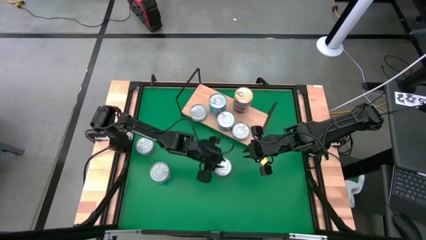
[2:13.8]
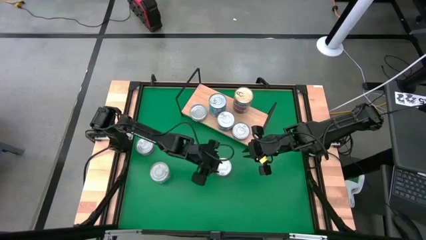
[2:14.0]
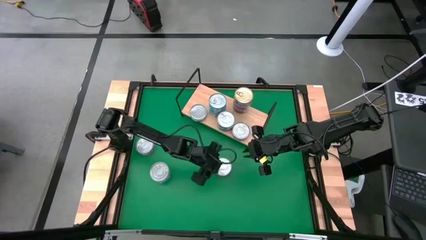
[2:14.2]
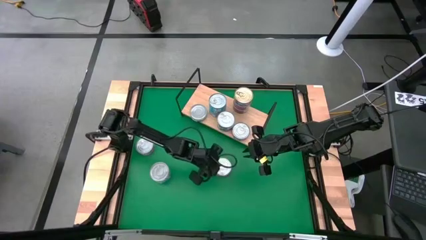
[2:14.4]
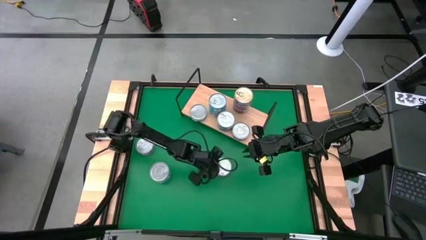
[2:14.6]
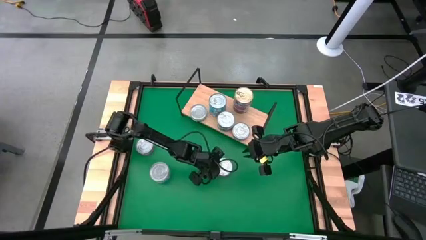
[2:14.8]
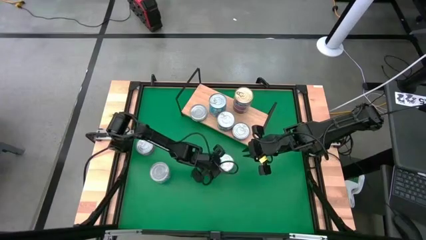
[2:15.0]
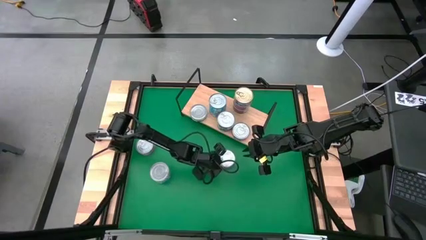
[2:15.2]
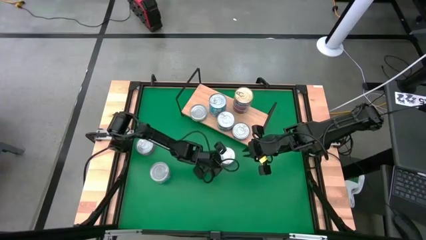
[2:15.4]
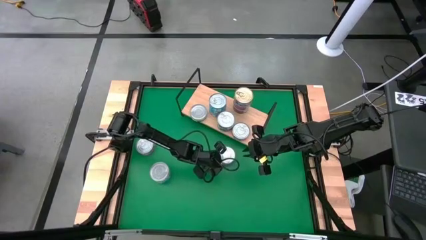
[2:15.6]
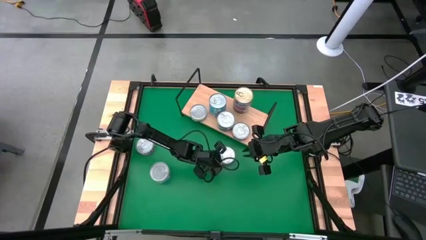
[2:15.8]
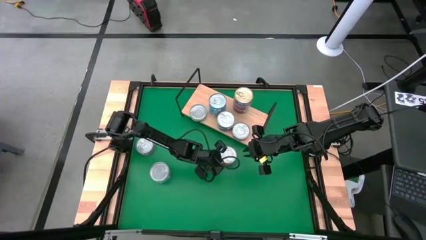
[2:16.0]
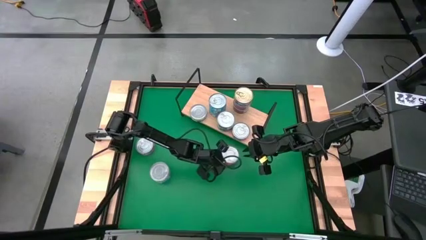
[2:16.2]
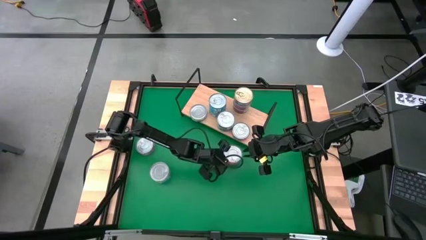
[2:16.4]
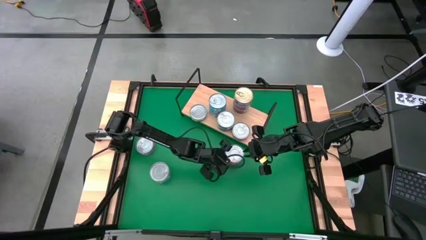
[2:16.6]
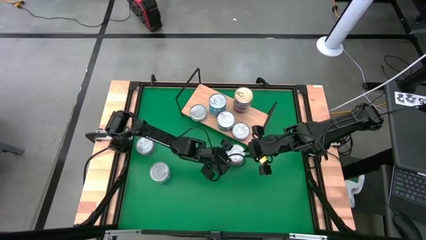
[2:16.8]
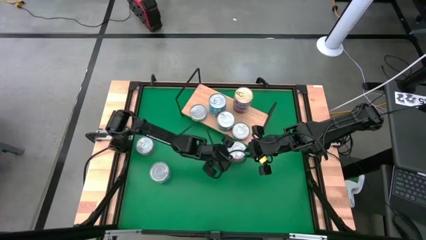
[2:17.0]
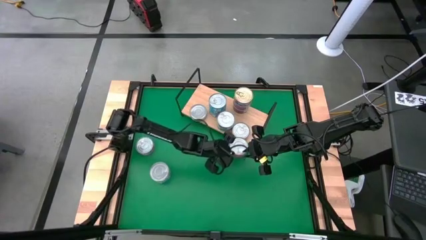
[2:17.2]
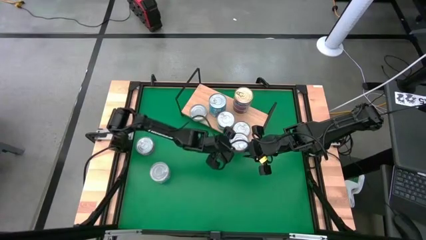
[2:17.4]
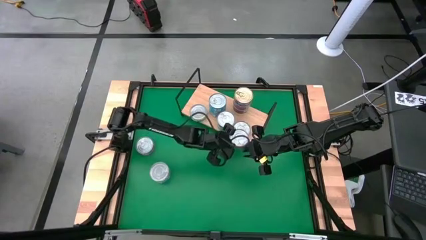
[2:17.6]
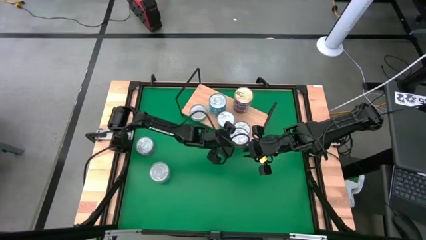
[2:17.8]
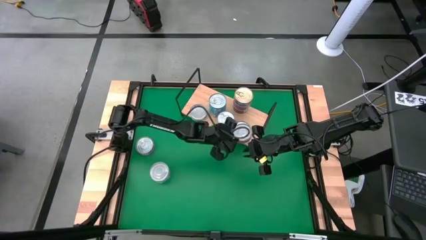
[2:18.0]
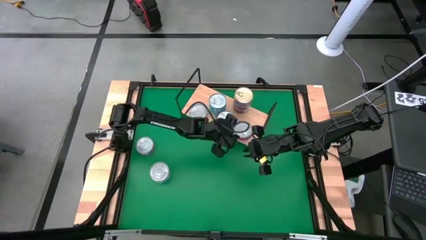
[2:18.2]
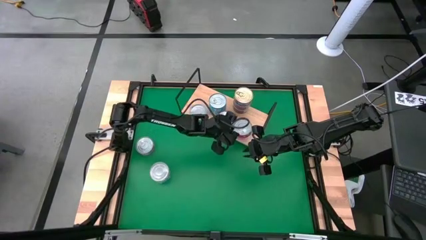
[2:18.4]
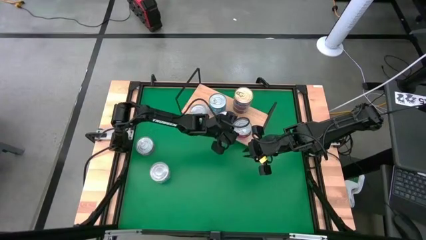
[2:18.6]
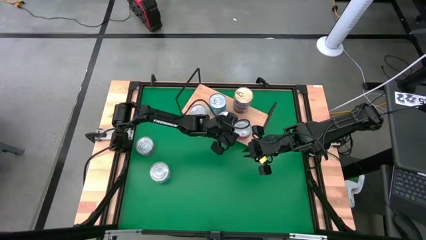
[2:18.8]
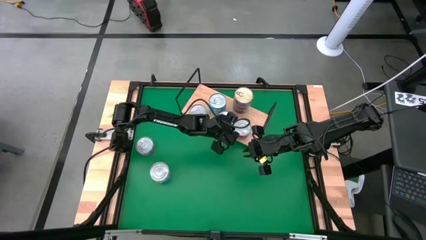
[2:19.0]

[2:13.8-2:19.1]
Task: Stack canned seafood by type on shelf
Stack the red tuna can on top of the red tuna can on the shelf

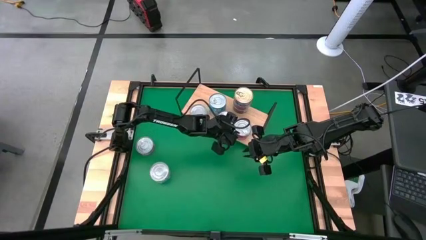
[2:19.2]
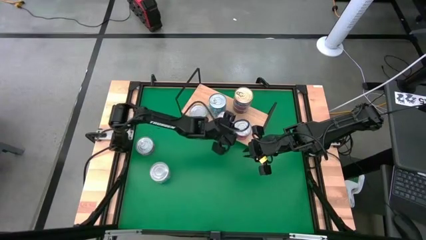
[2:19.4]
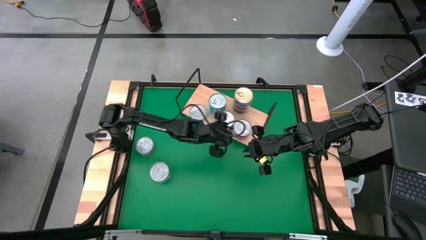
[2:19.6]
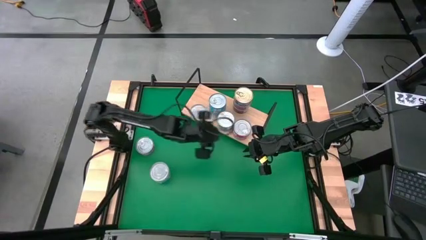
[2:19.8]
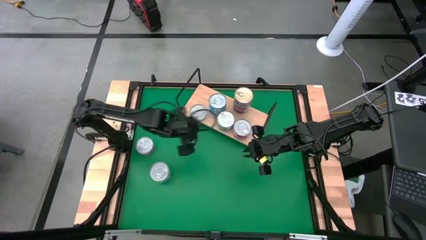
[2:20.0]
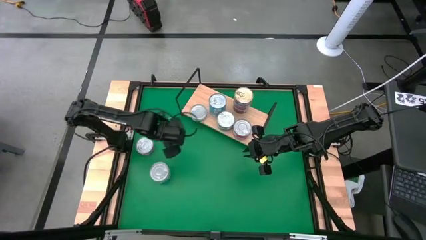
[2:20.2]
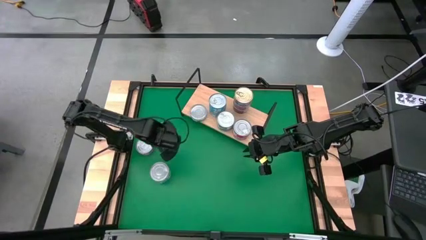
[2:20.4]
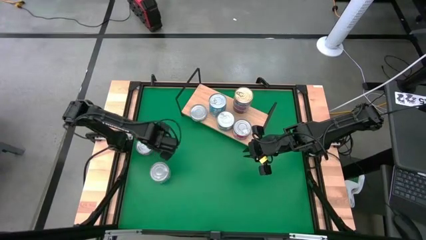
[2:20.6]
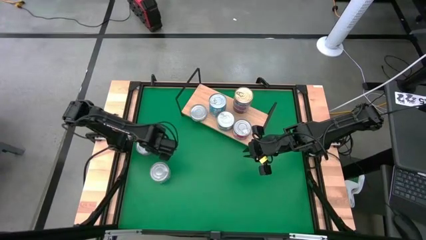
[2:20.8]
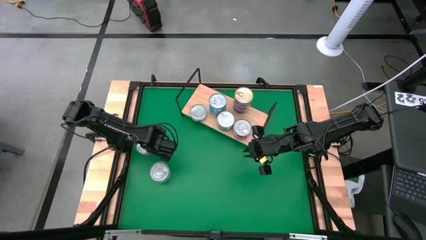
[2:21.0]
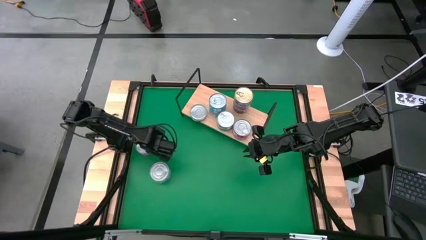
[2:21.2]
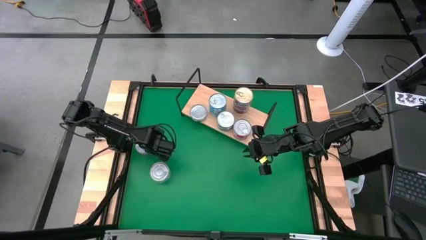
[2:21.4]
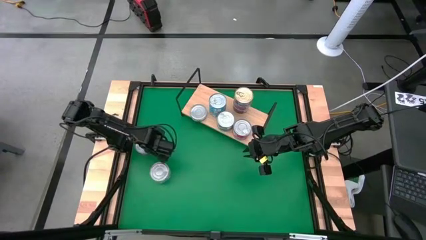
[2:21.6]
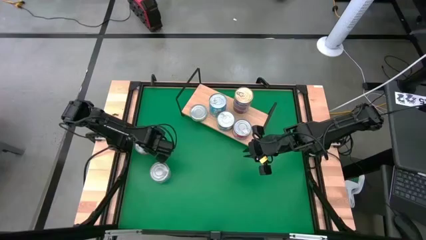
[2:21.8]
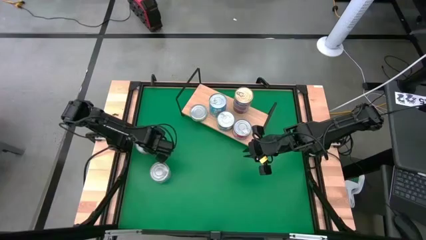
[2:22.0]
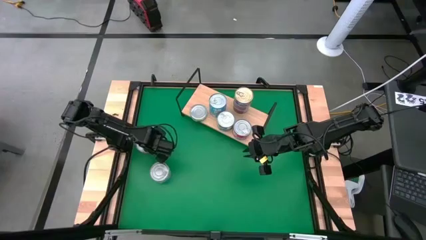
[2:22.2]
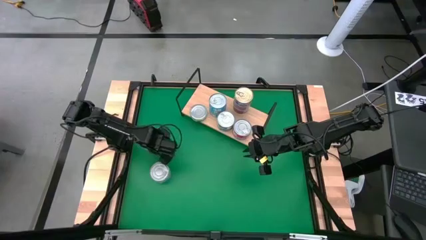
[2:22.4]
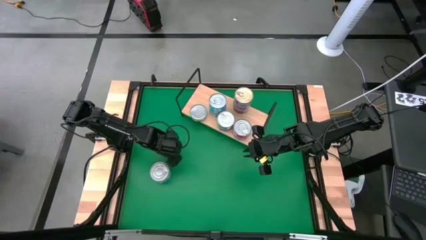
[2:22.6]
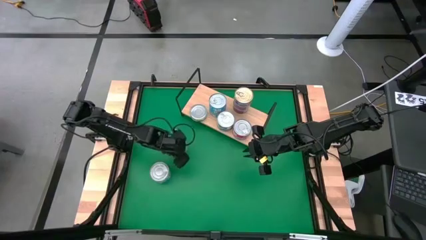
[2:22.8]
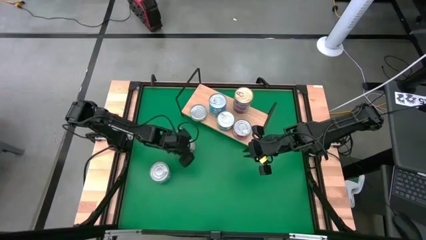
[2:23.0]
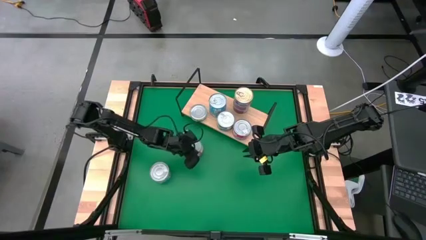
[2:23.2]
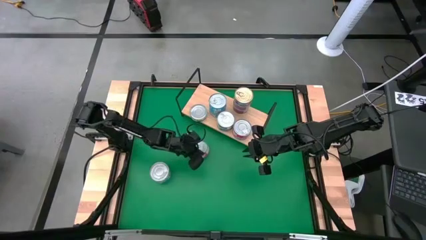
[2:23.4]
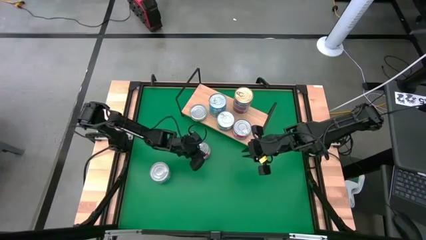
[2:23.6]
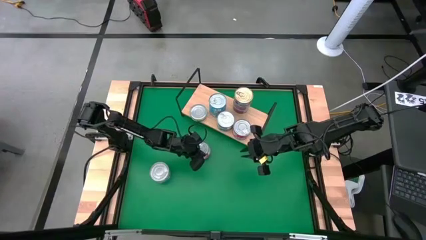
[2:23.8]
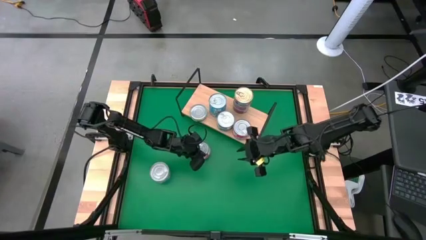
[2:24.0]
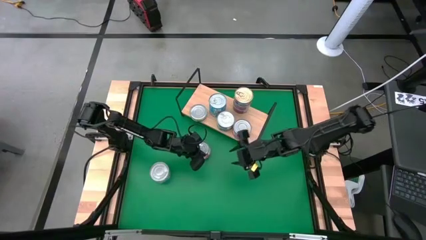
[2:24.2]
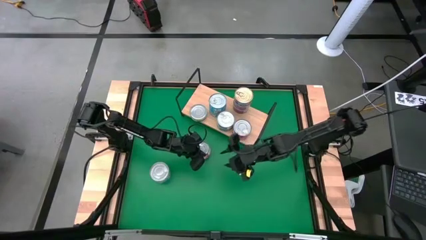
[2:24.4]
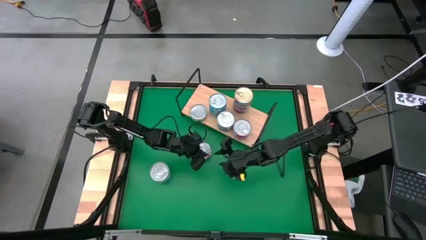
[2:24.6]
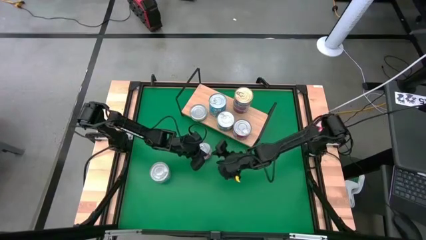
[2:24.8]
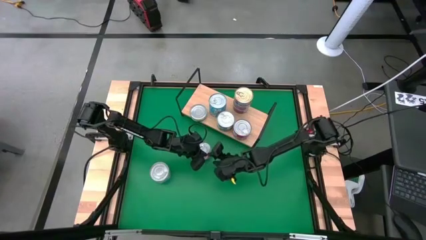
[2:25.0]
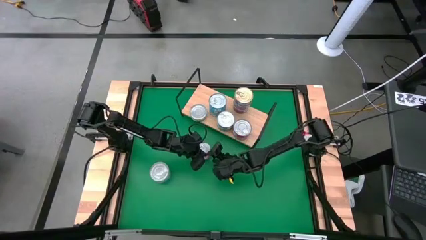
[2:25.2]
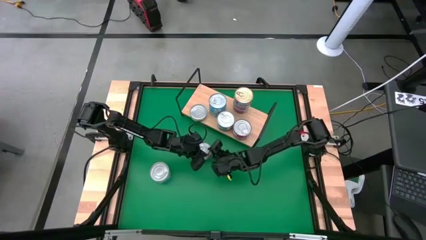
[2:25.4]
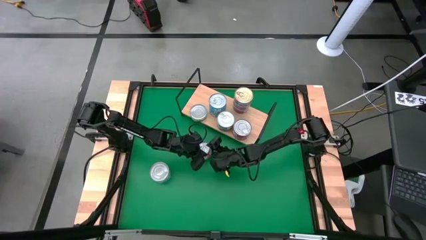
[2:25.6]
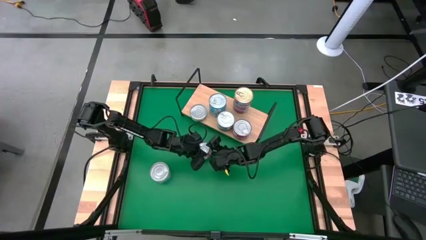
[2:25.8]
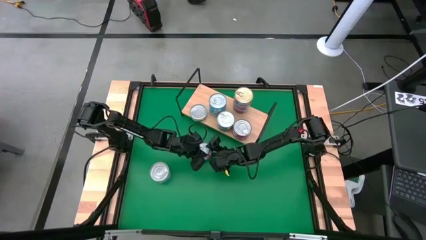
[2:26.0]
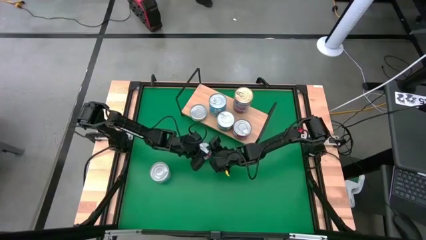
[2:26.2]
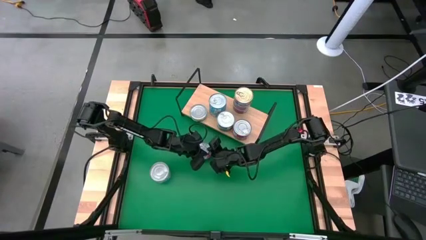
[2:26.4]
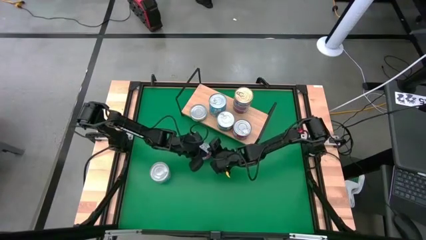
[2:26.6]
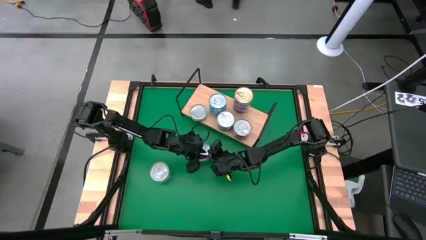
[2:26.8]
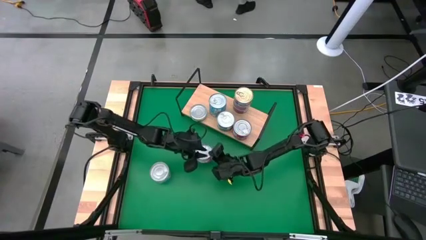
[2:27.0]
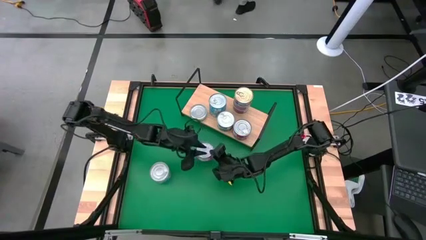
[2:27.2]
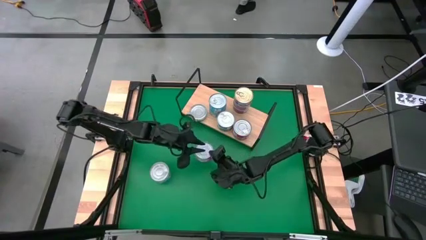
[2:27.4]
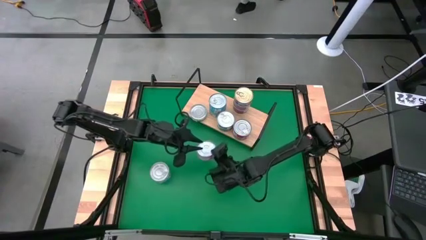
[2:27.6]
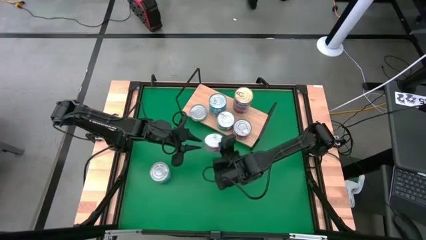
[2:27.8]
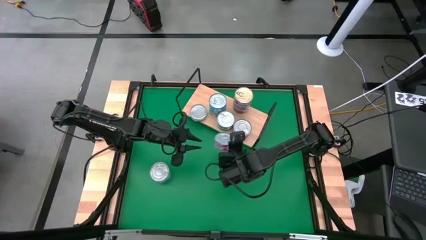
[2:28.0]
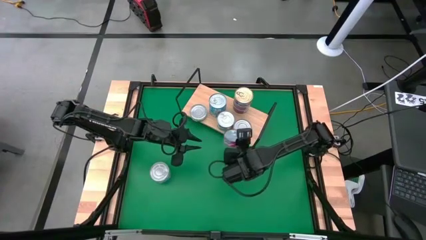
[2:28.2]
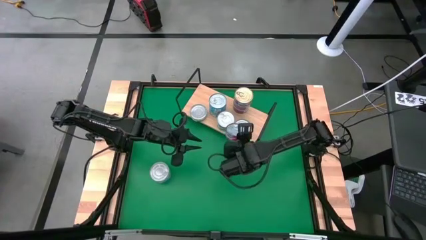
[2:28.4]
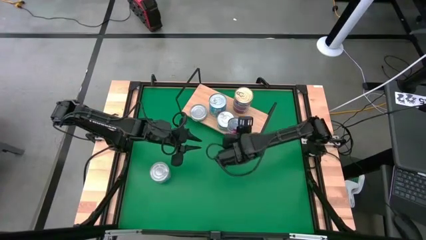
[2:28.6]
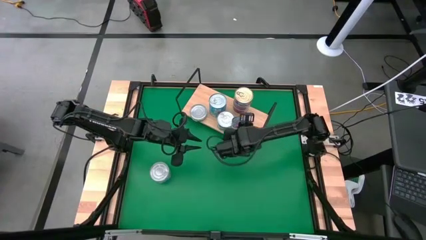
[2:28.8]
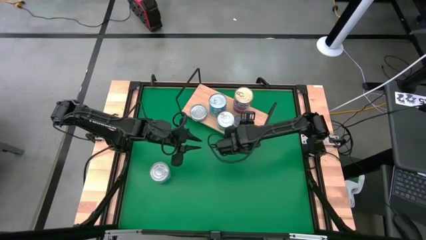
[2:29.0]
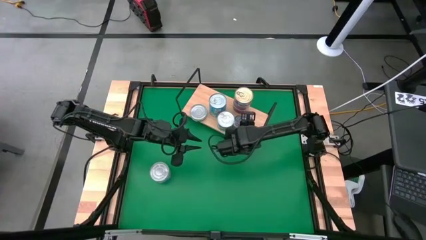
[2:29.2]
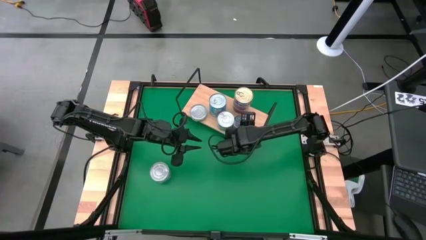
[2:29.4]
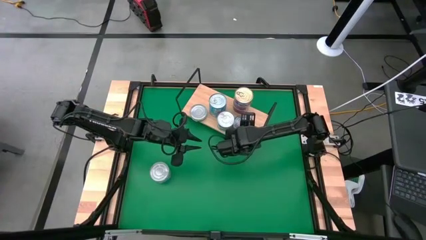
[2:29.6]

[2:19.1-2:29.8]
Stack the red tuna can on top of the red tuna can on the shelf

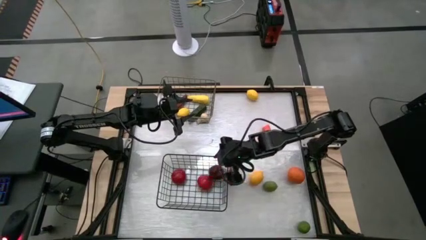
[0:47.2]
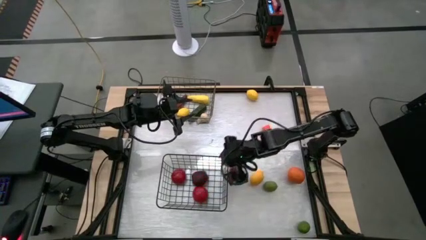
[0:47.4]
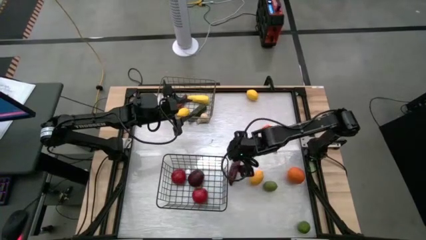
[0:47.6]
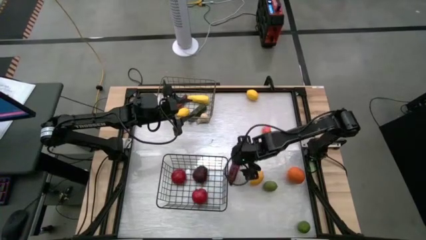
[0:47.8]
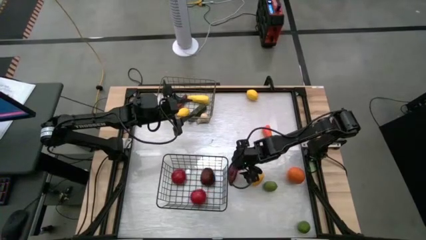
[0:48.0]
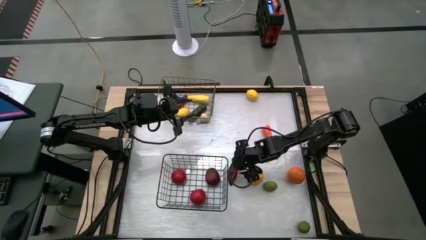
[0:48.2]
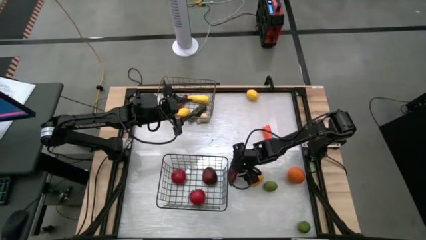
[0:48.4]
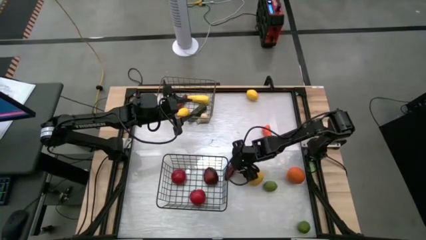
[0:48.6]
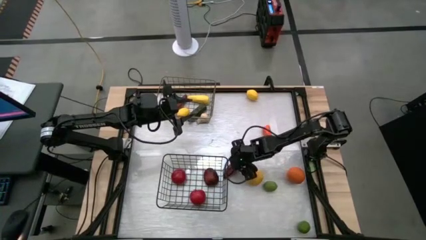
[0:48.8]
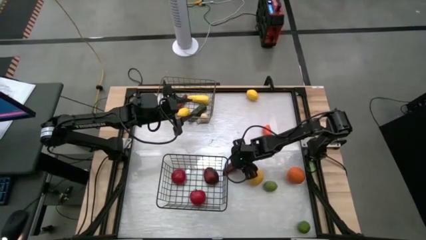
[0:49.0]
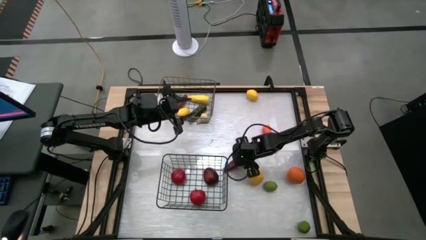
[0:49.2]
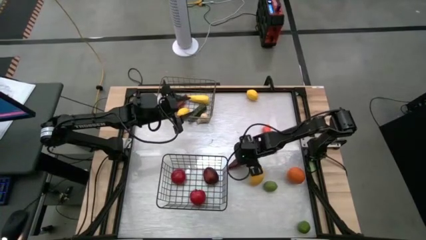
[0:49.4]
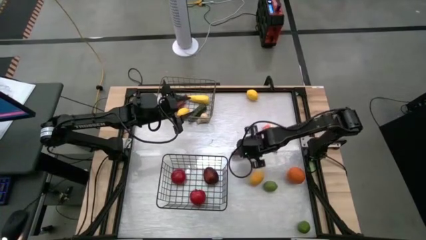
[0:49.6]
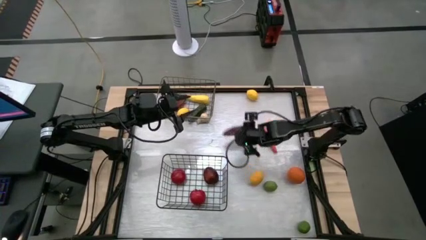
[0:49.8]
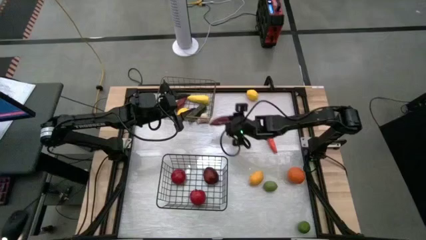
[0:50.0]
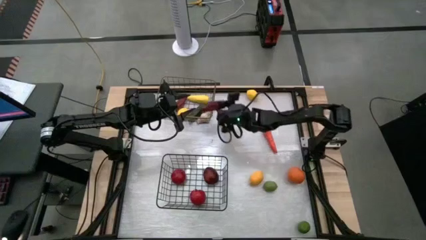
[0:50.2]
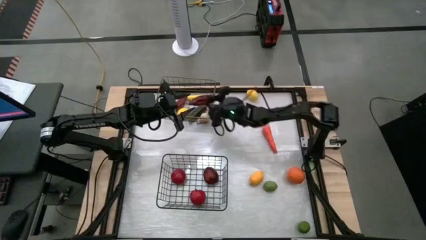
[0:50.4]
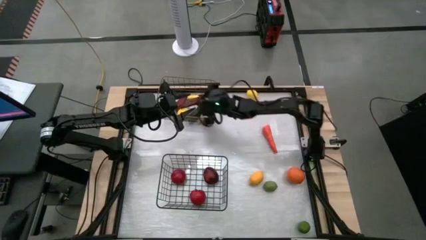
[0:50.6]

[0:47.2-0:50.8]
Task: Sort produce into baskets
Put the dark red chili pepper into the top wire basket
